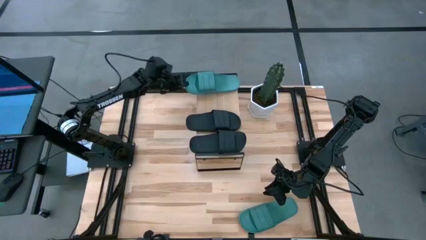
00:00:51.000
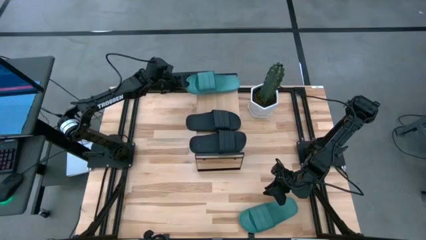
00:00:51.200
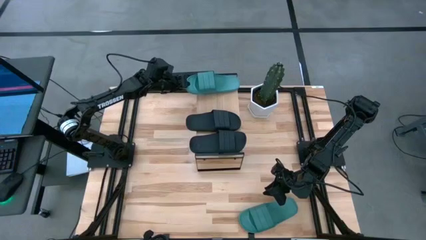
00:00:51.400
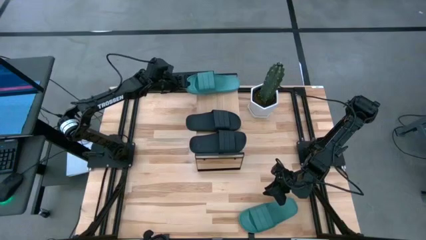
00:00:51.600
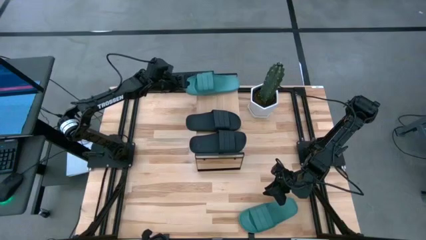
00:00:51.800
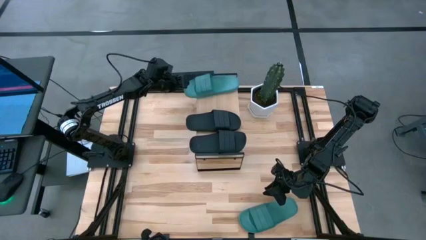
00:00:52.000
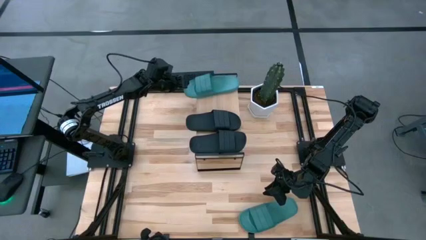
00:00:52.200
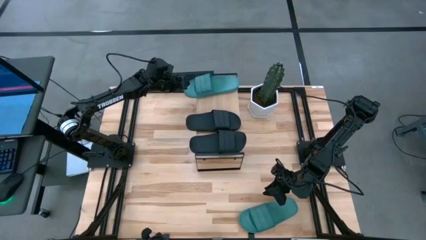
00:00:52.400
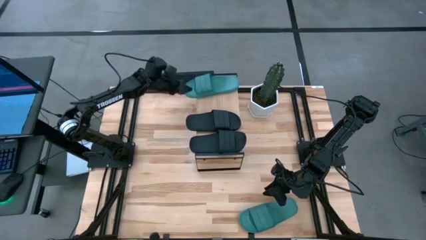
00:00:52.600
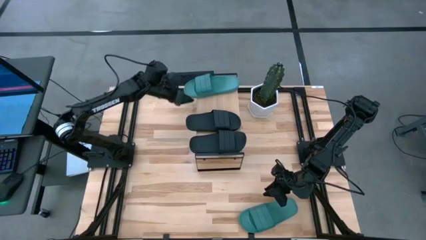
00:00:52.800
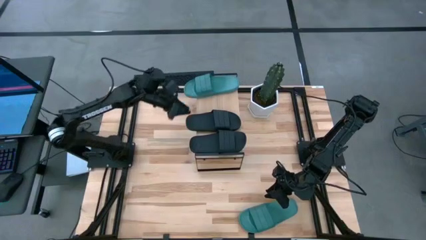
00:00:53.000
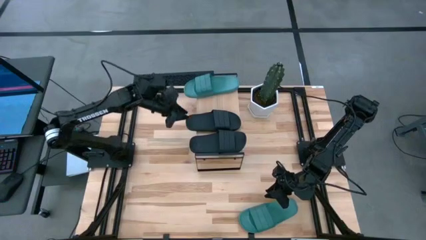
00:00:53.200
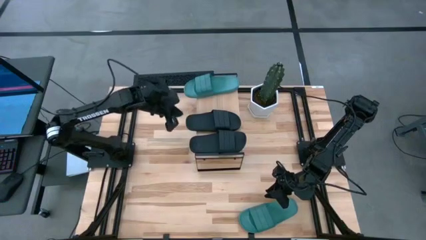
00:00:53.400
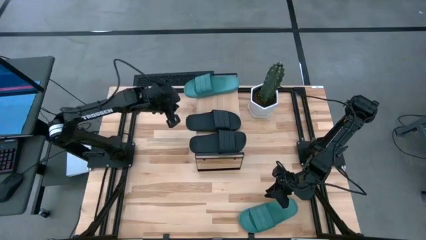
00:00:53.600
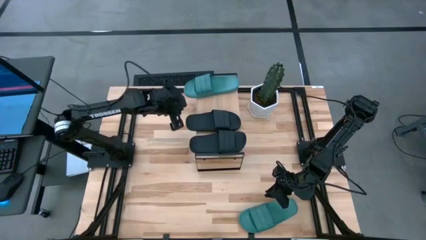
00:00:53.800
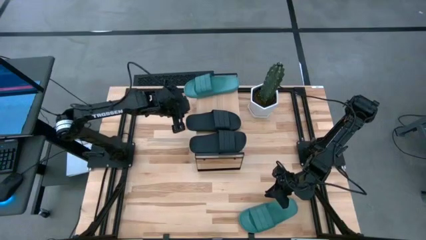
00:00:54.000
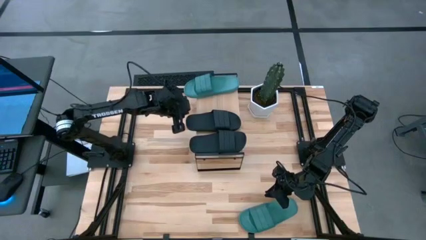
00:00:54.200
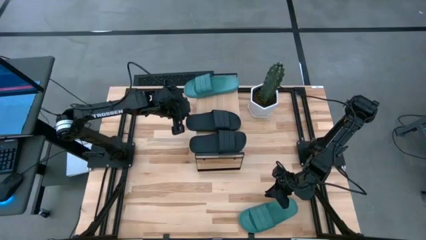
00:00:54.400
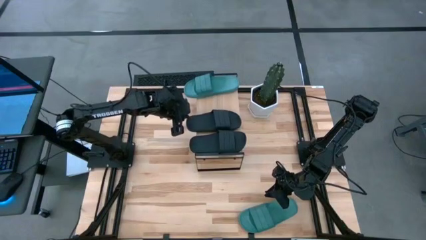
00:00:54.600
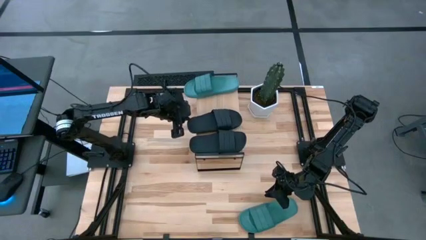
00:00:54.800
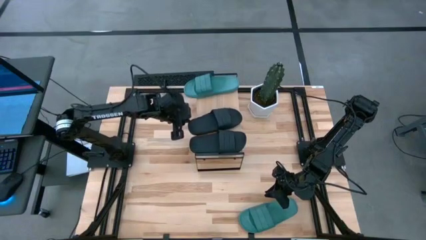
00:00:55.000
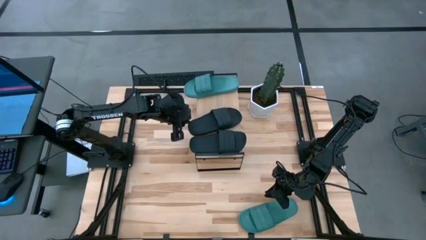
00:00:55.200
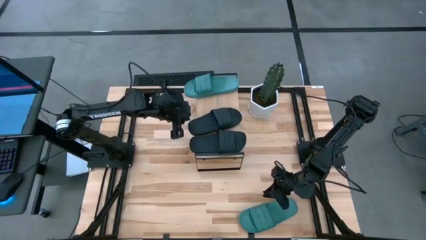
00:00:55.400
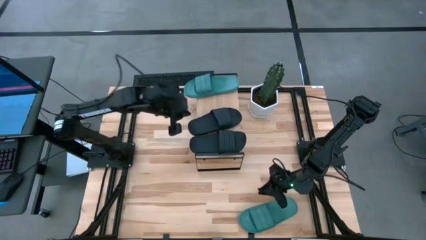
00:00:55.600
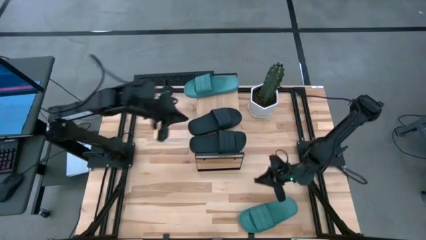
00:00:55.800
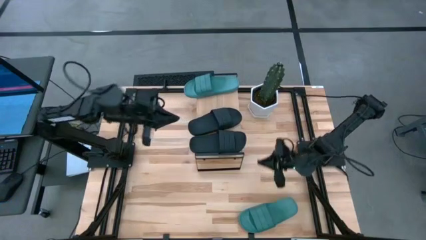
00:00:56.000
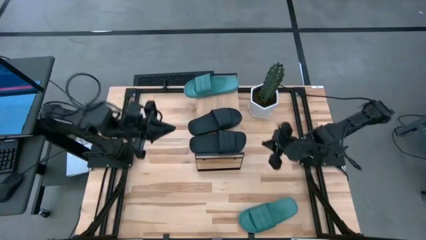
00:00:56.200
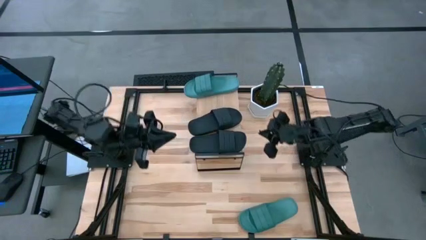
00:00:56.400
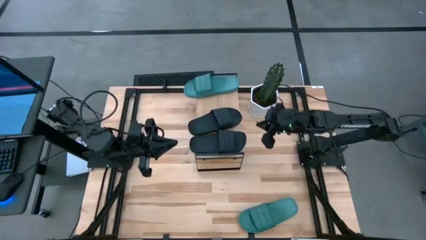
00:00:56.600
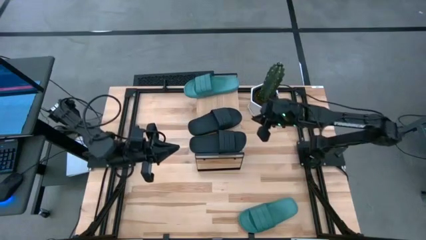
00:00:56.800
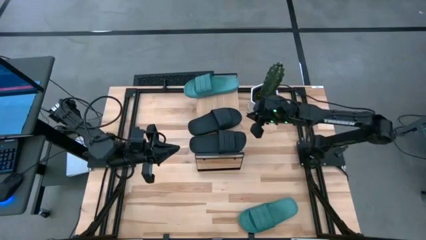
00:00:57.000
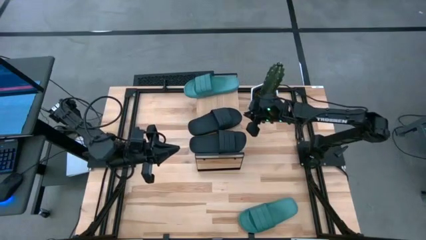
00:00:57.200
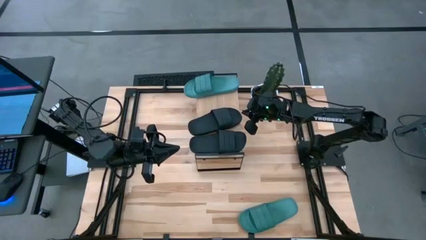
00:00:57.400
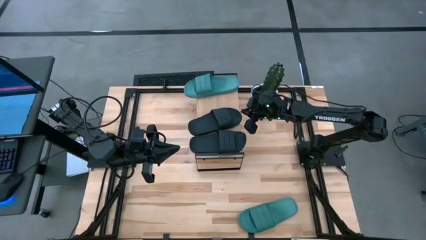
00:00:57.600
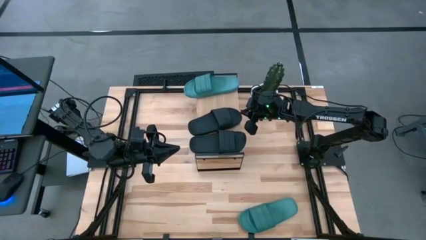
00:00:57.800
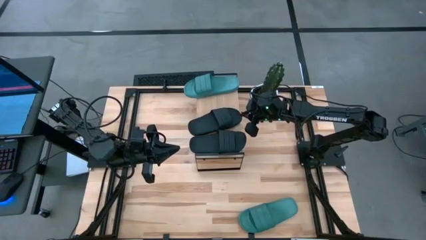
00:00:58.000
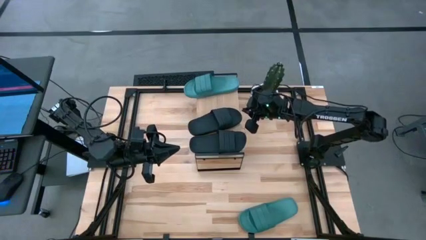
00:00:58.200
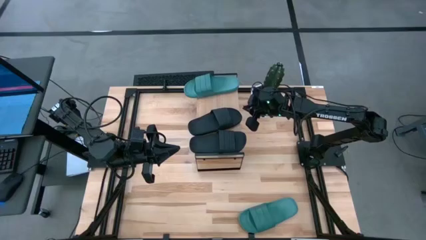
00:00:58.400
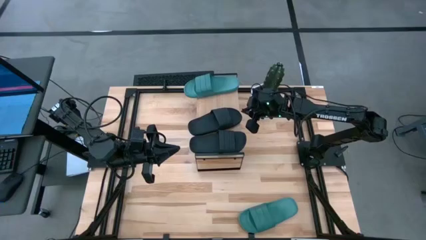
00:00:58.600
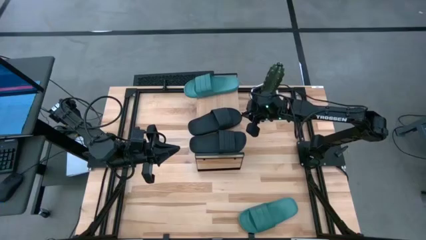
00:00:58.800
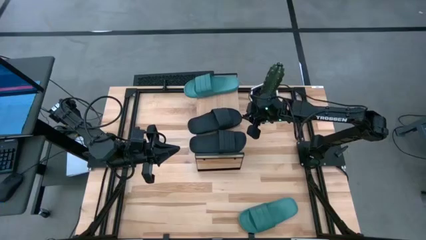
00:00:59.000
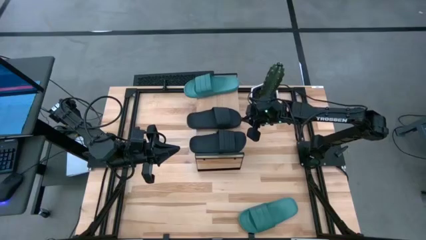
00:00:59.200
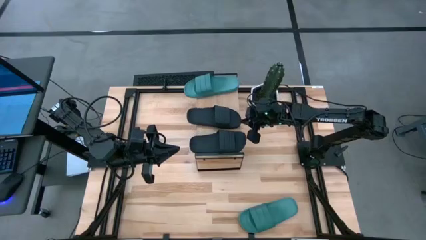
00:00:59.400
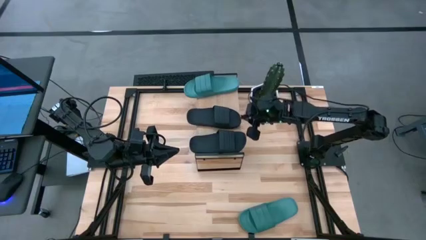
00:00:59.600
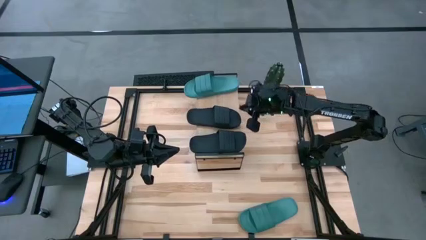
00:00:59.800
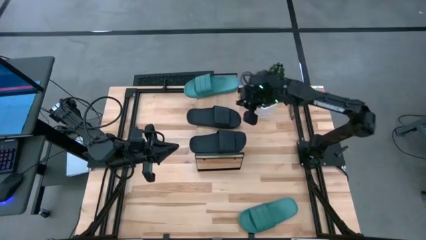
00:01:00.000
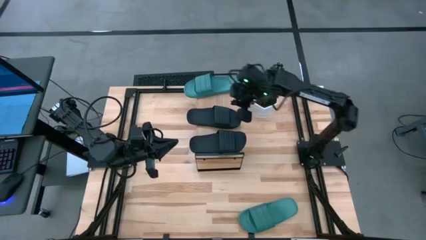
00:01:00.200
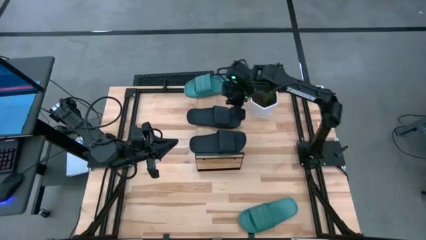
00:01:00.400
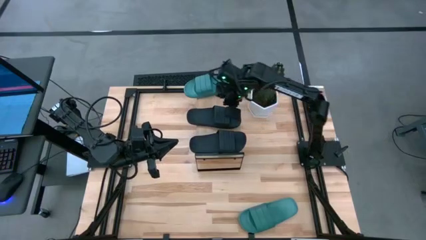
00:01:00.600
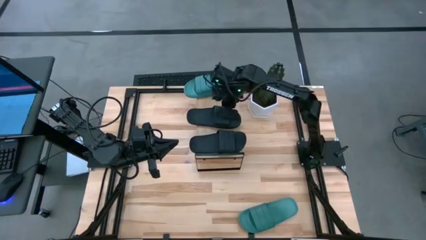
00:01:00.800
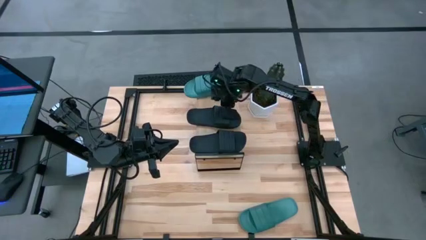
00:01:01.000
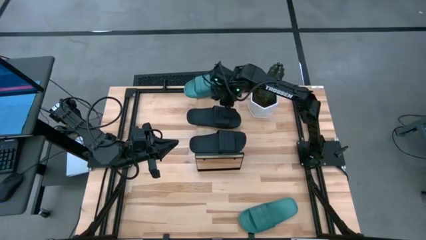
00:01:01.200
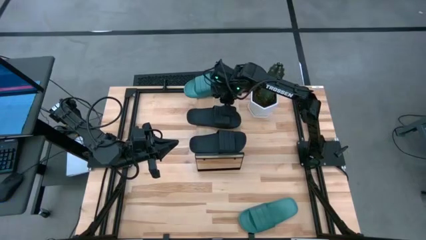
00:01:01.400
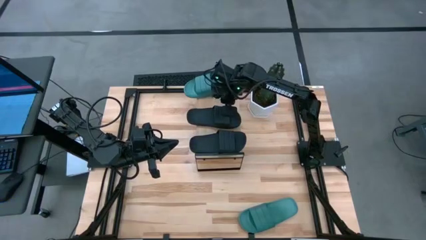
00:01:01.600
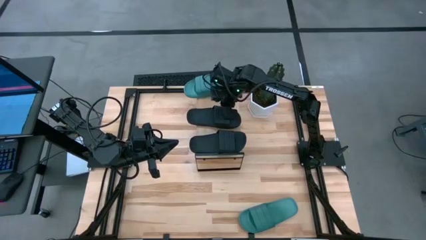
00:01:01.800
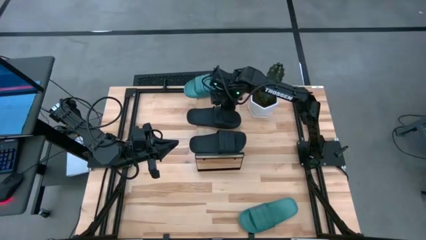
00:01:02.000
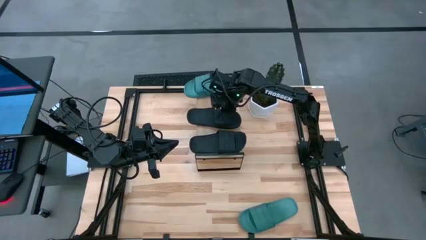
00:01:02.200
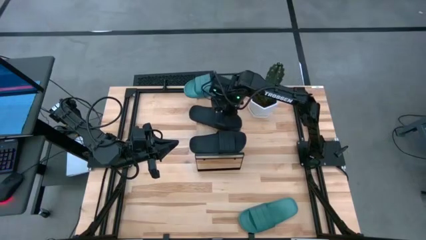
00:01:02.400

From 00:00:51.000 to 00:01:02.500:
Task: Pick and place slides into the shelf
Adjust the top black slipper on the shelf

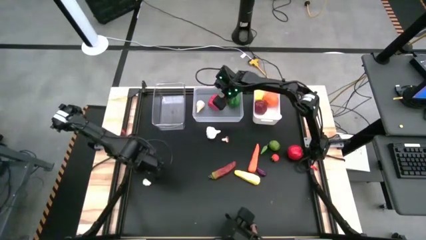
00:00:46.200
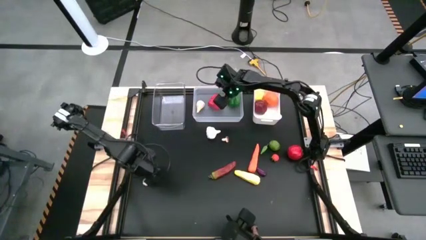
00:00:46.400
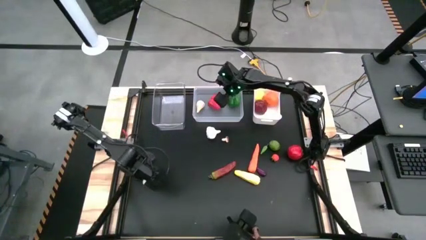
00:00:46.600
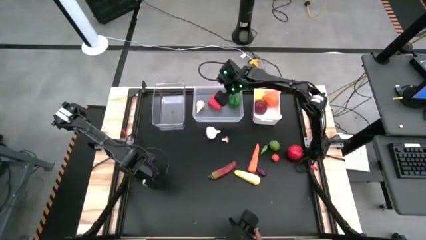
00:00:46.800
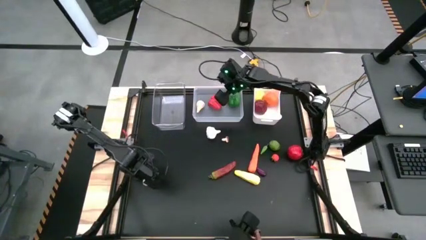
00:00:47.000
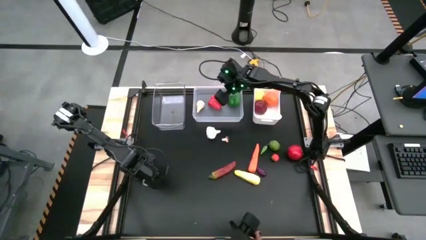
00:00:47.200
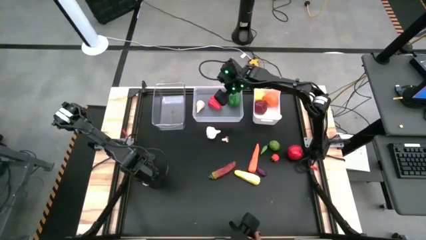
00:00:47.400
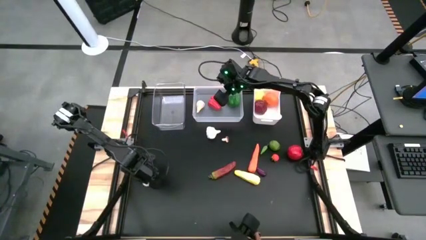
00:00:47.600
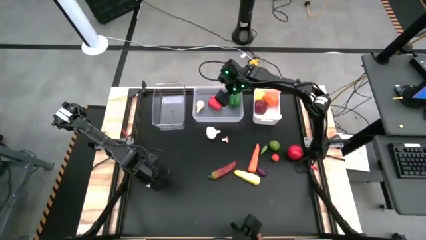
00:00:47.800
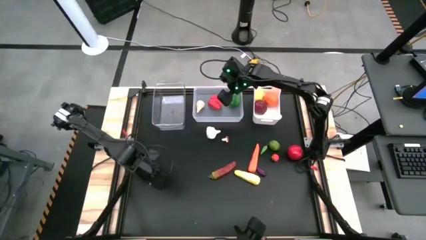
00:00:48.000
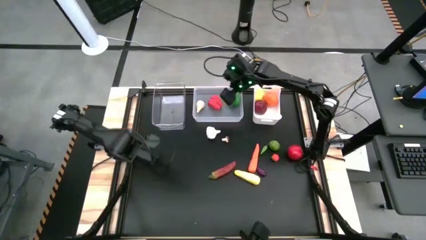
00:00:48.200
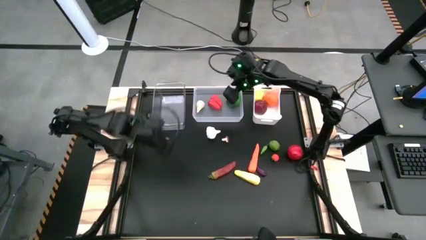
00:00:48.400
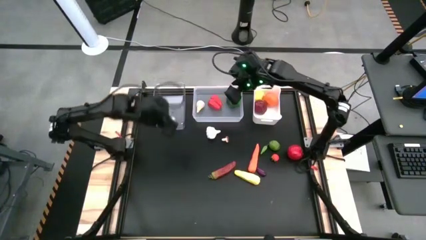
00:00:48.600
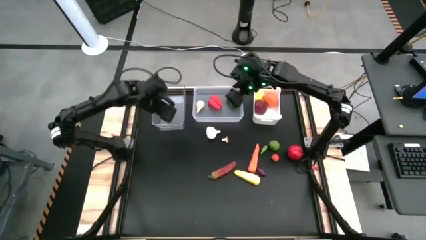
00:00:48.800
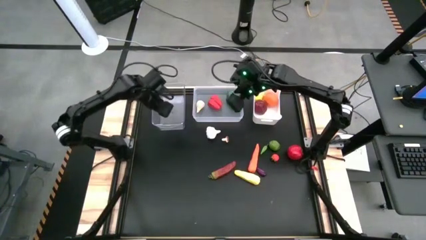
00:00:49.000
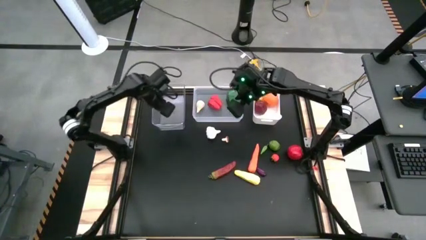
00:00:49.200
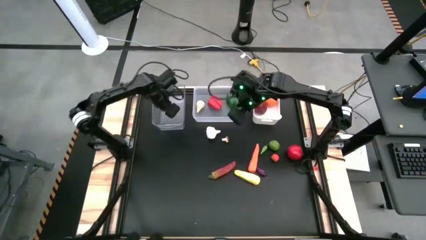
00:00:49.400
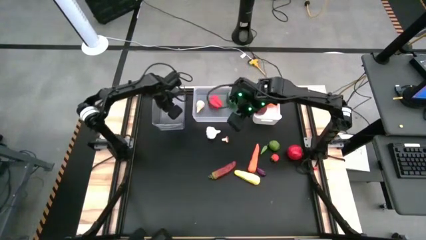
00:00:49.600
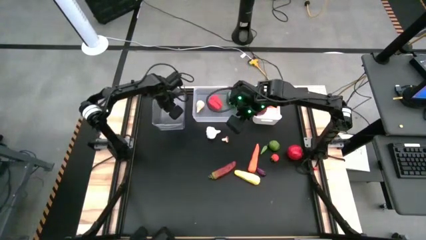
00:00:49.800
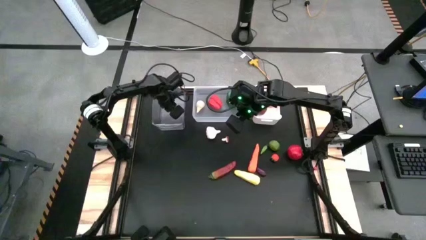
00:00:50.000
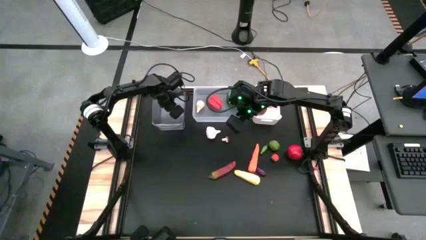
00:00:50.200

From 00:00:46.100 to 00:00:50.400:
Task: Sort produce into baskets
Put the bottom white garlic into the glass bin
